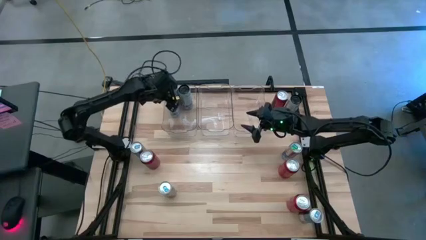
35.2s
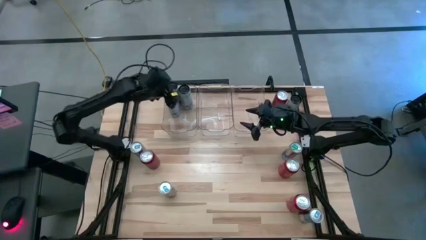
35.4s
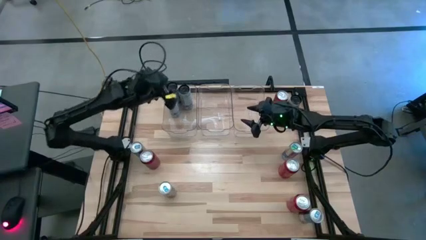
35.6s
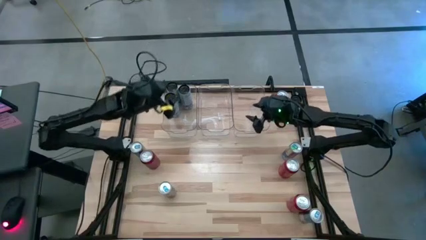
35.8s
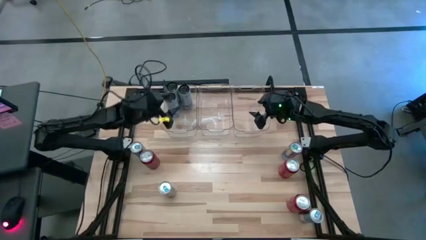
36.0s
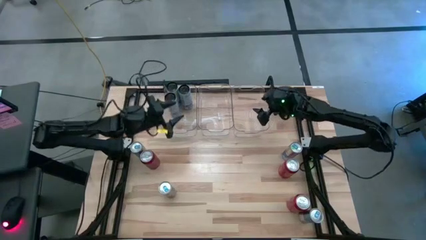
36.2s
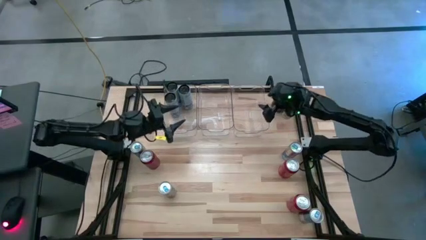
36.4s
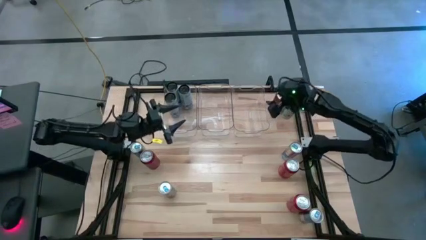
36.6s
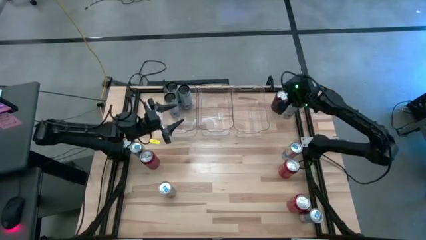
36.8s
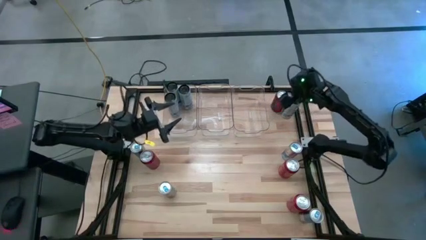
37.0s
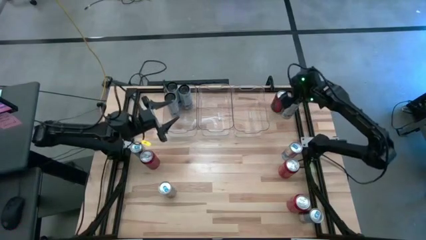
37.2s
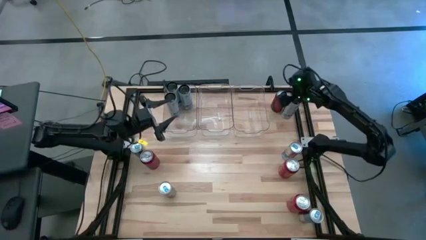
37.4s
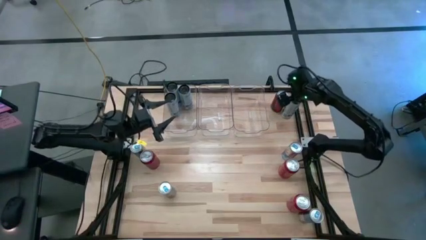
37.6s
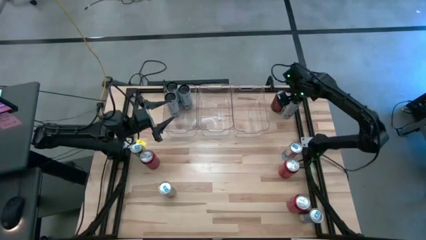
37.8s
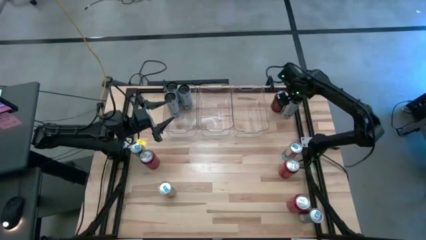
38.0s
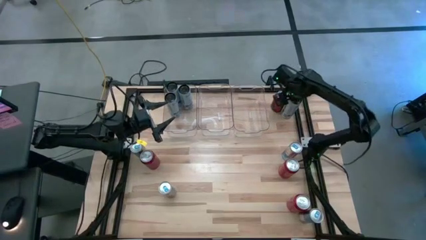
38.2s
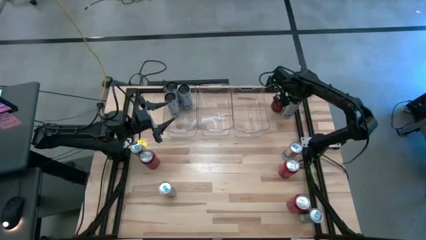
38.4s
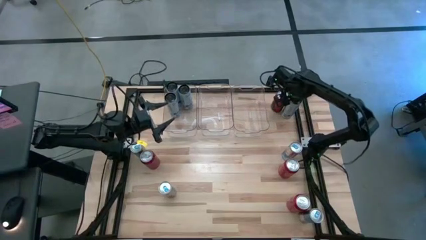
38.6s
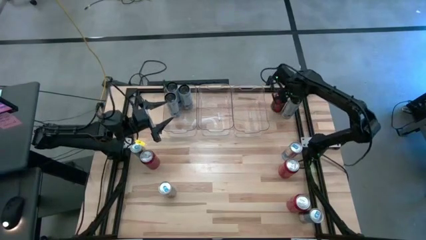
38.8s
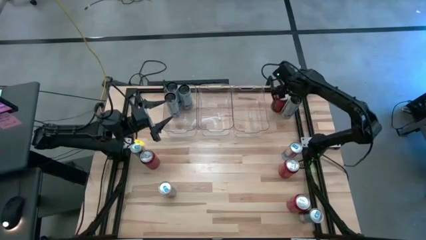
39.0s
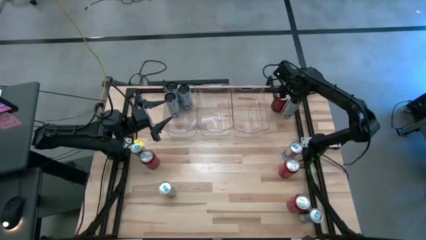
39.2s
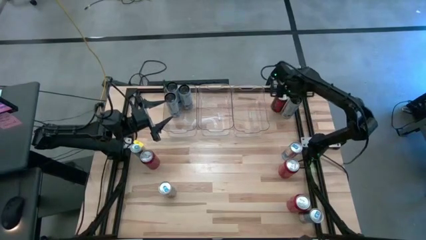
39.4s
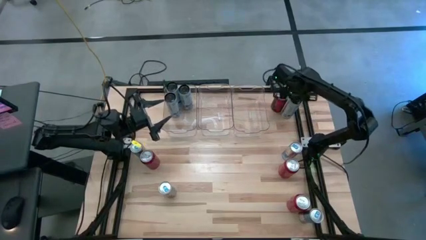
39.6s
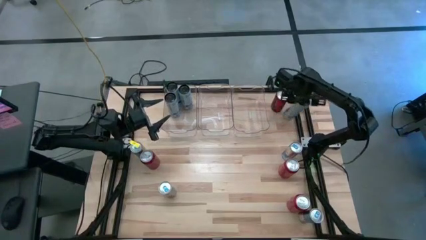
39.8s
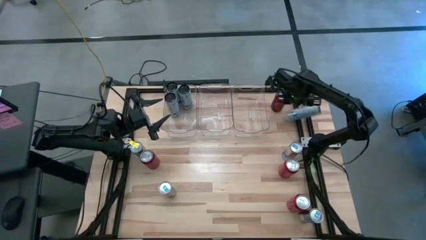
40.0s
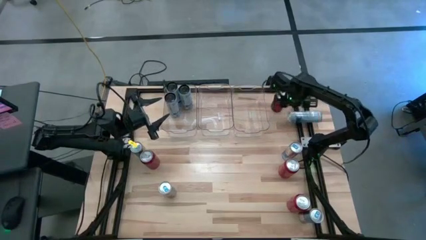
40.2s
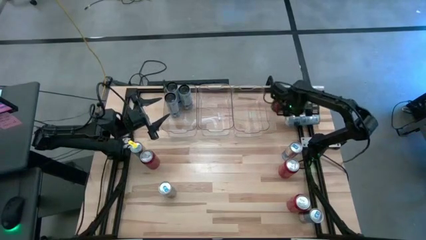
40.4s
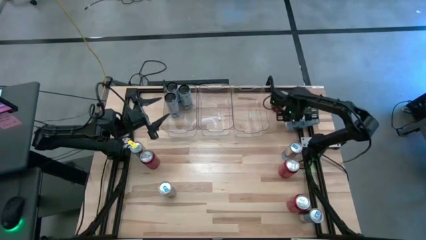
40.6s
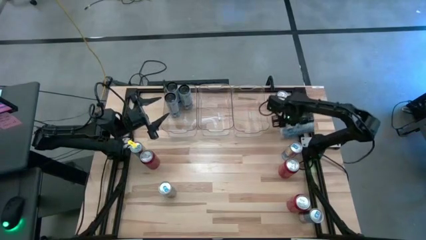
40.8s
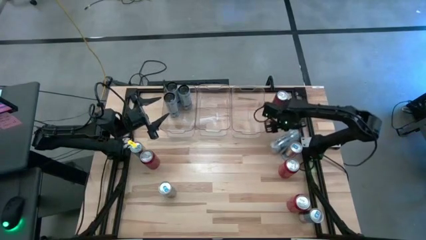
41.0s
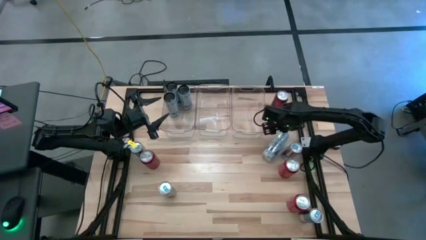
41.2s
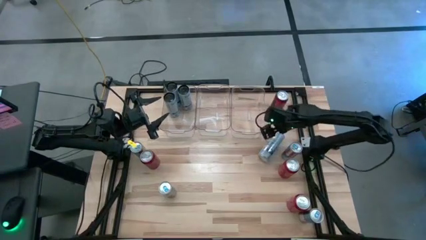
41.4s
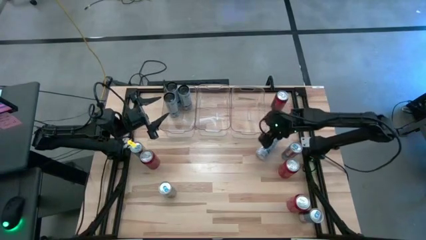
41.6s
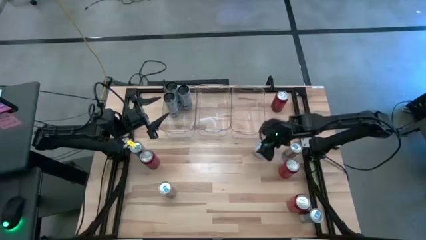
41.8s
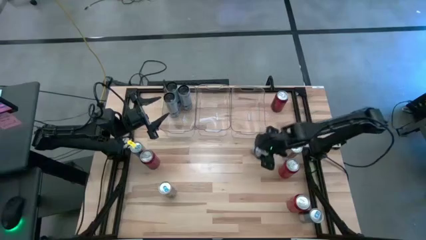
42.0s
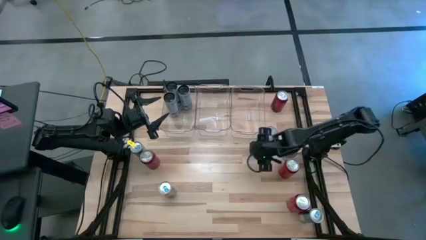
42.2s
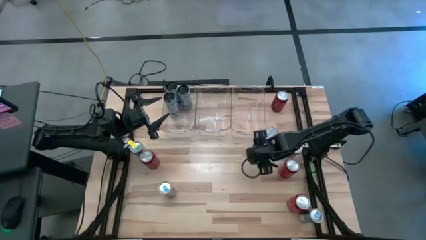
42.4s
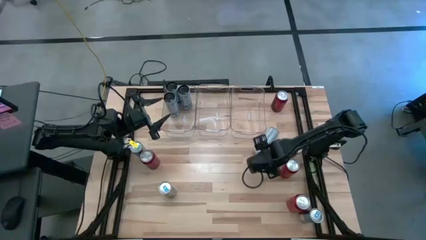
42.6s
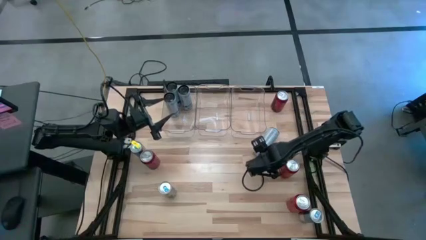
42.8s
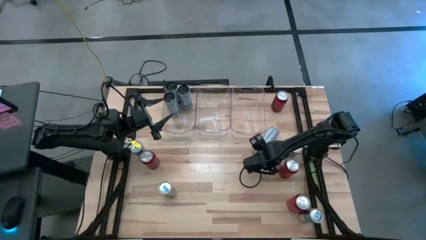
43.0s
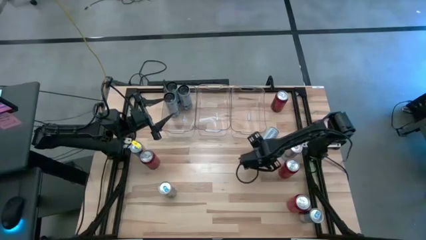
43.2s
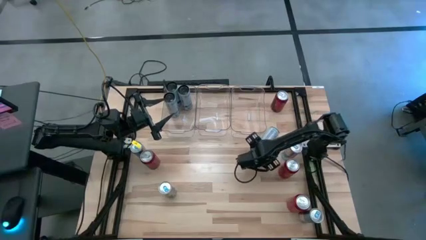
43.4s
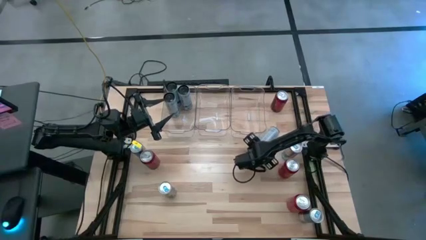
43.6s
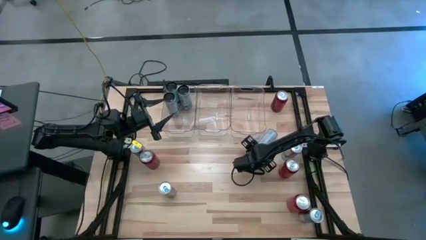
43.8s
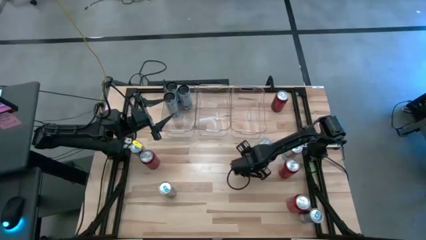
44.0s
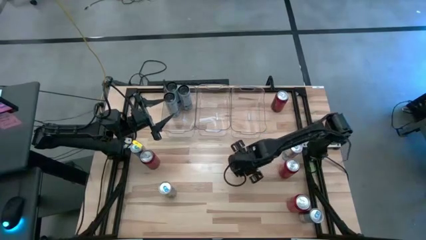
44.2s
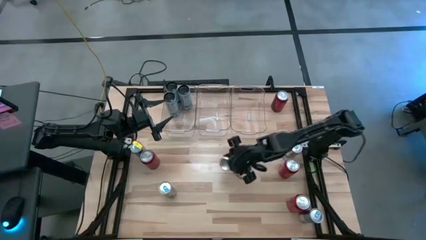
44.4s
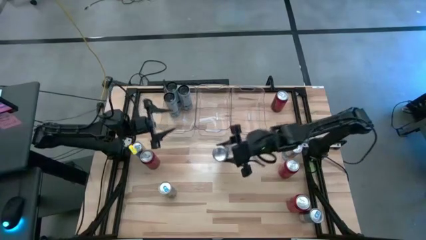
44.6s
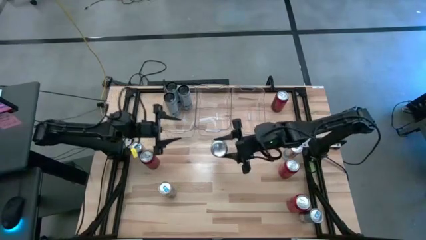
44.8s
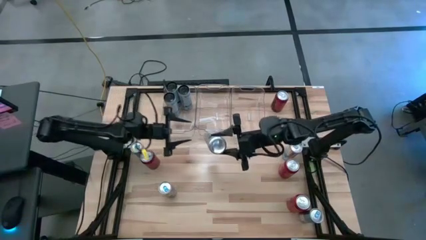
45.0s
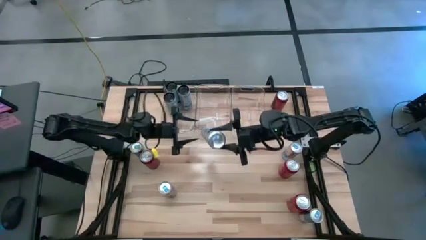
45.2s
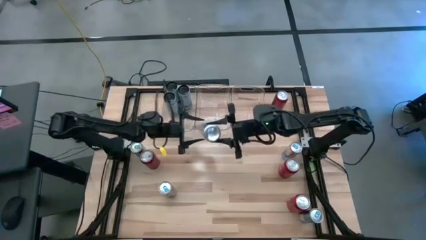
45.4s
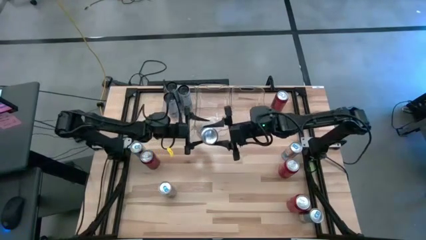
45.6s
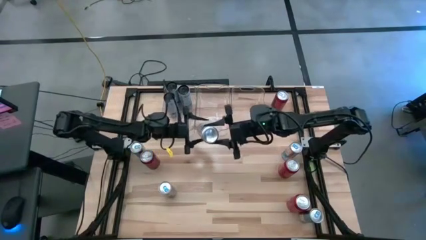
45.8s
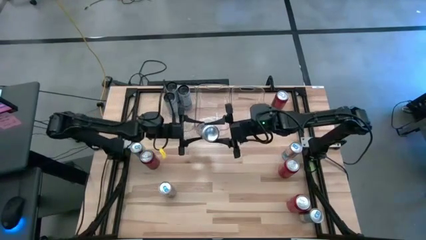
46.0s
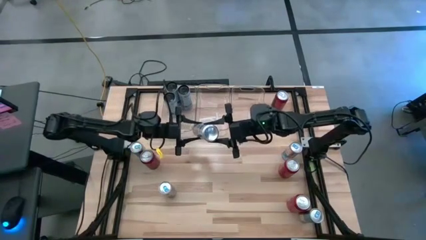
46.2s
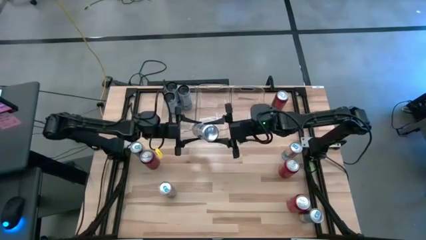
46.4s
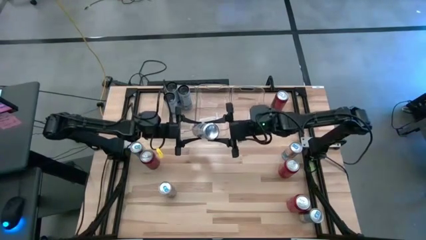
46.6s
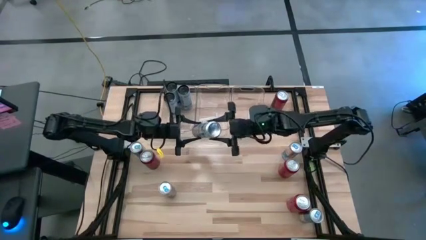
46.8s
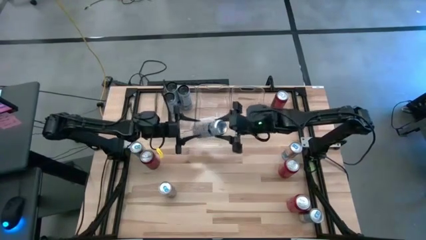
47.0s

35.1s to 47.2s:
Task: Sort soda cans
Put the white-blue soda can into the left transparent bin
